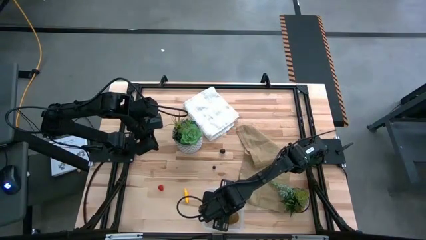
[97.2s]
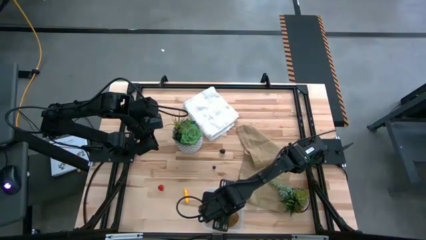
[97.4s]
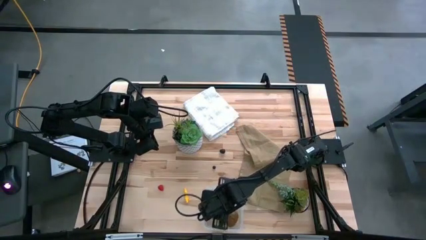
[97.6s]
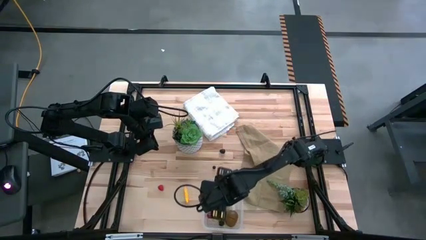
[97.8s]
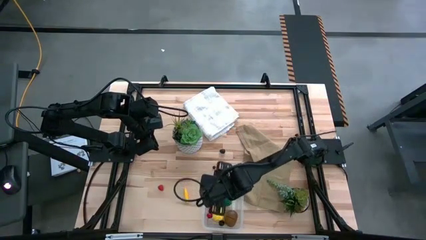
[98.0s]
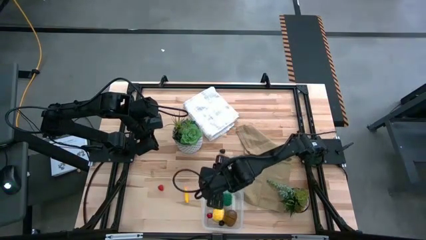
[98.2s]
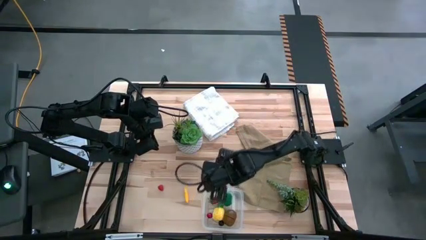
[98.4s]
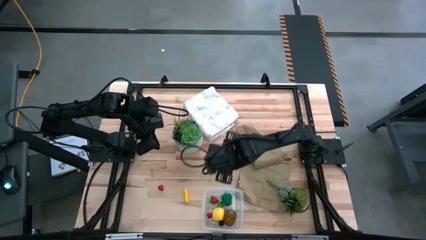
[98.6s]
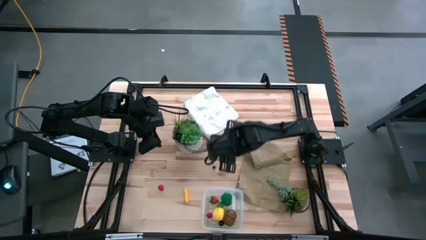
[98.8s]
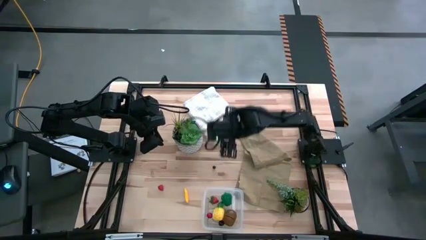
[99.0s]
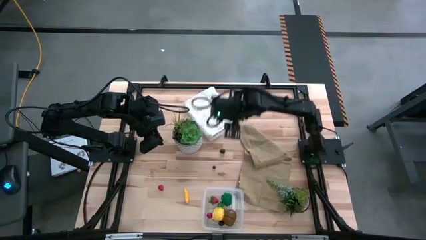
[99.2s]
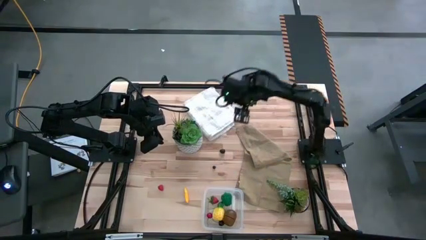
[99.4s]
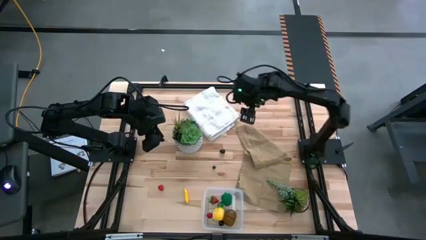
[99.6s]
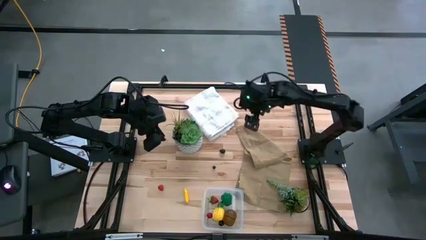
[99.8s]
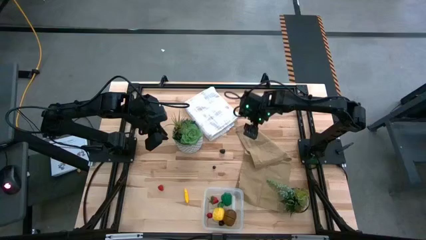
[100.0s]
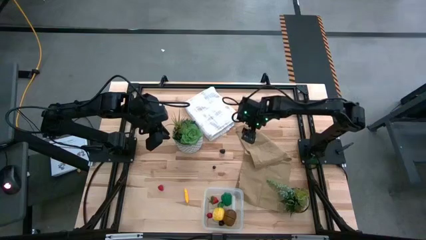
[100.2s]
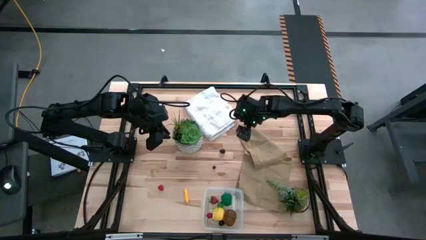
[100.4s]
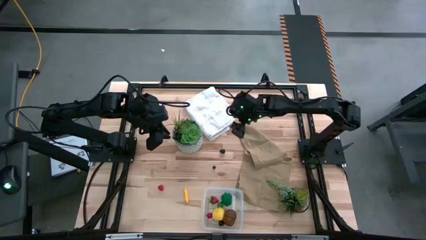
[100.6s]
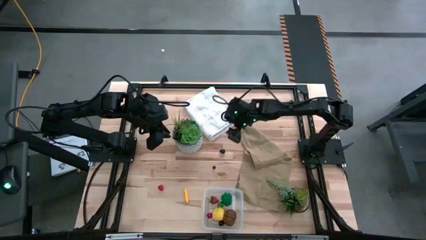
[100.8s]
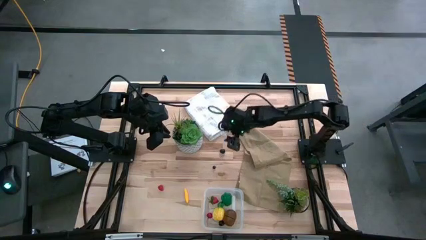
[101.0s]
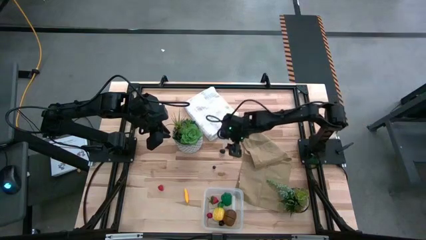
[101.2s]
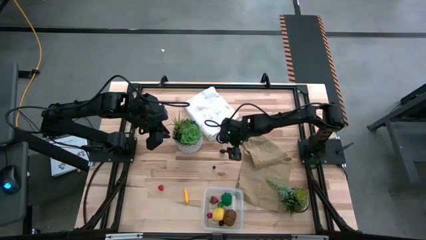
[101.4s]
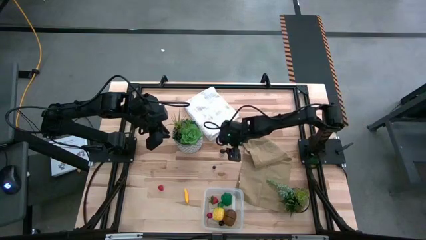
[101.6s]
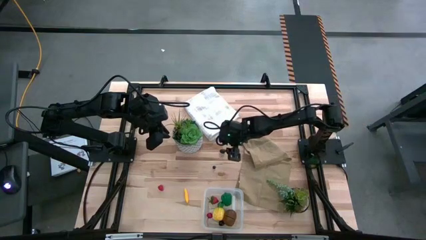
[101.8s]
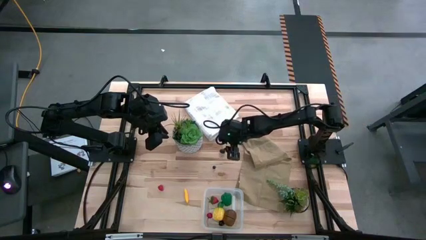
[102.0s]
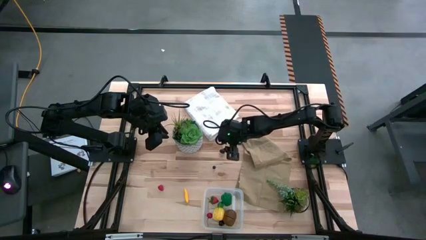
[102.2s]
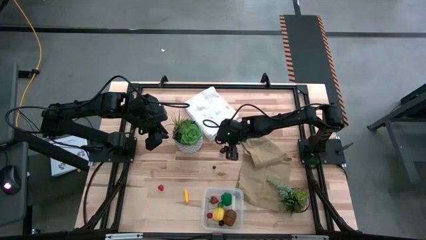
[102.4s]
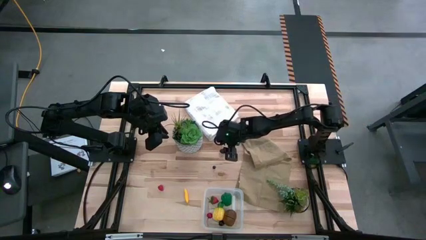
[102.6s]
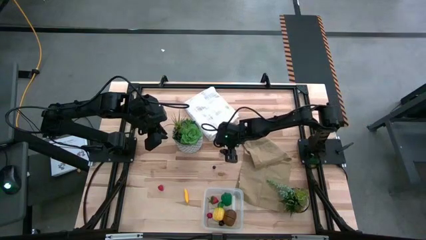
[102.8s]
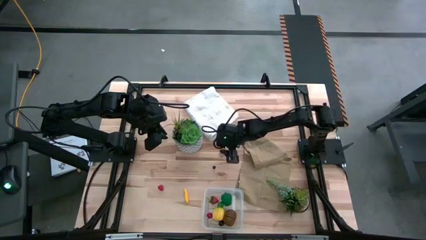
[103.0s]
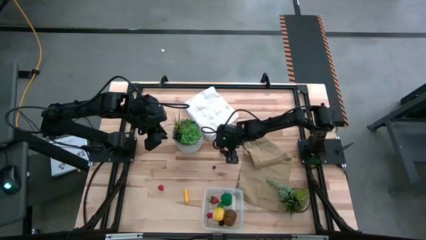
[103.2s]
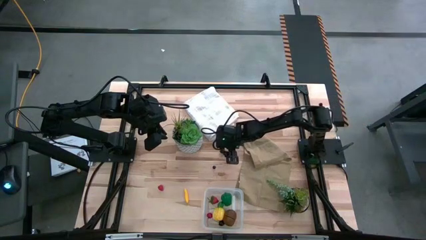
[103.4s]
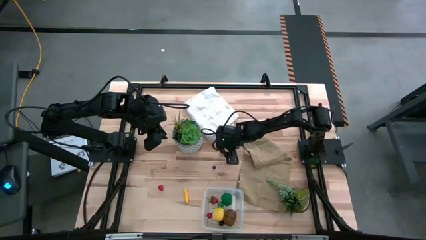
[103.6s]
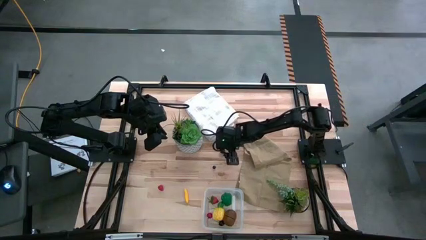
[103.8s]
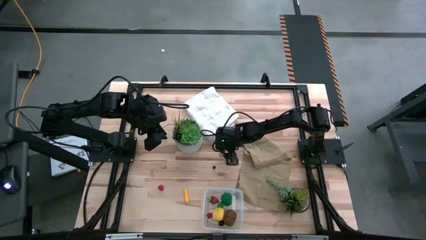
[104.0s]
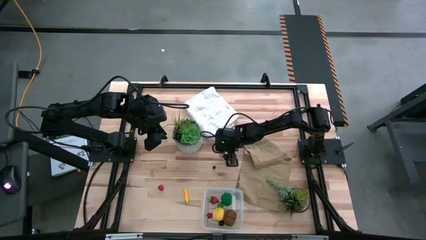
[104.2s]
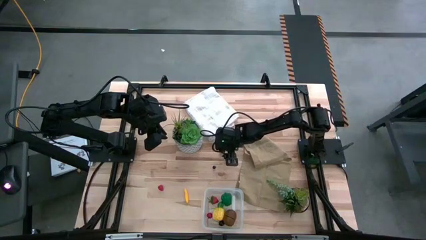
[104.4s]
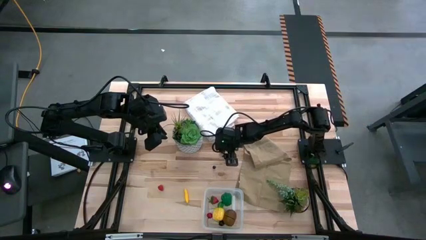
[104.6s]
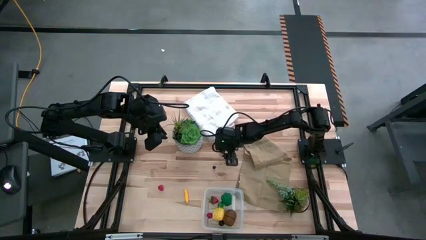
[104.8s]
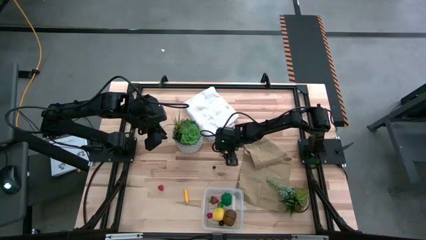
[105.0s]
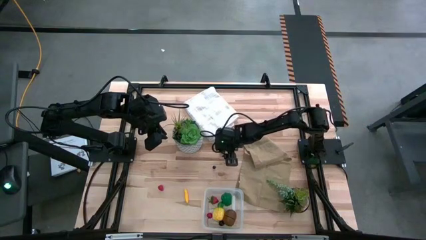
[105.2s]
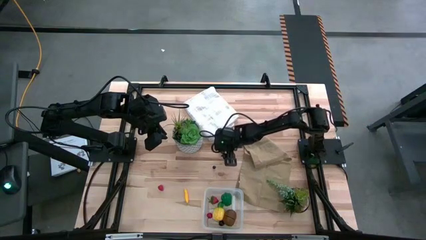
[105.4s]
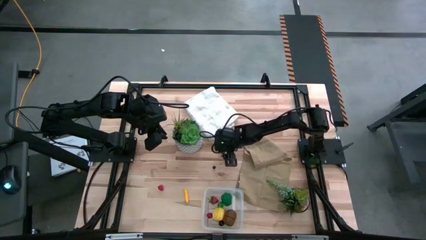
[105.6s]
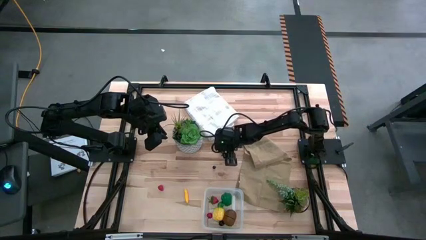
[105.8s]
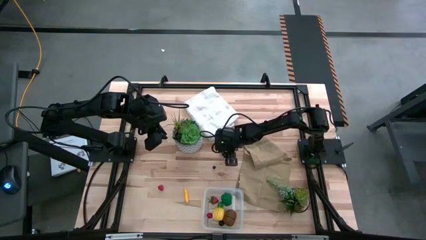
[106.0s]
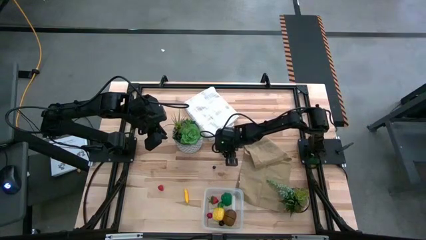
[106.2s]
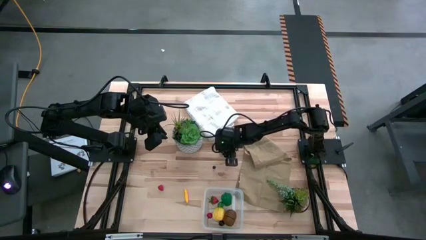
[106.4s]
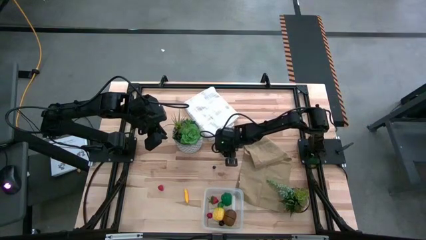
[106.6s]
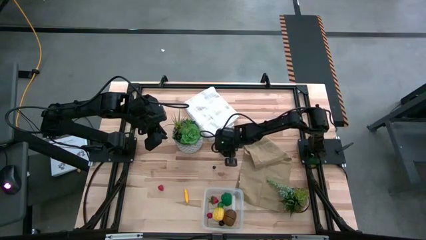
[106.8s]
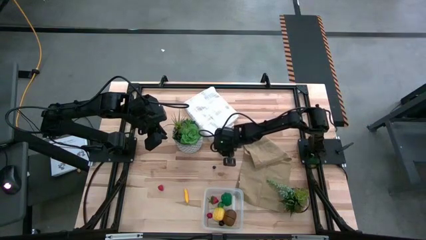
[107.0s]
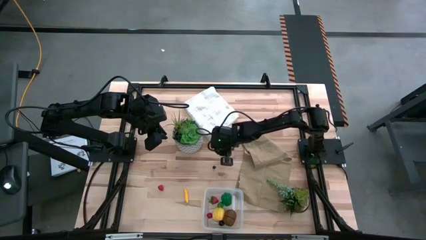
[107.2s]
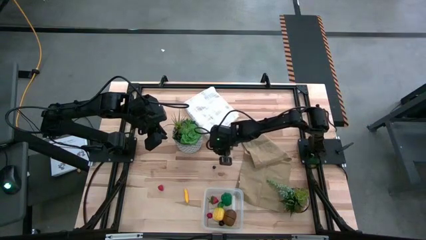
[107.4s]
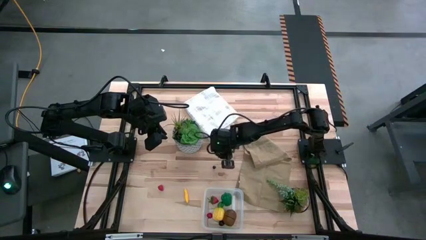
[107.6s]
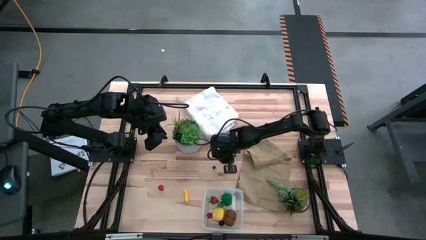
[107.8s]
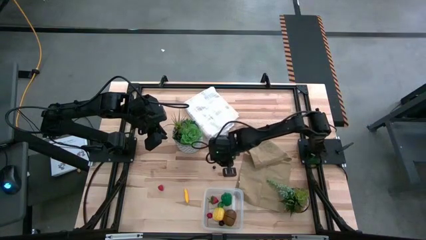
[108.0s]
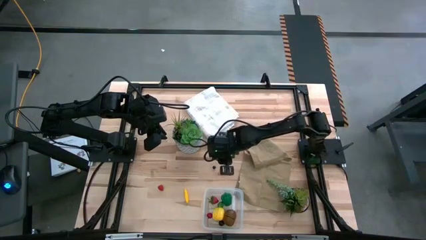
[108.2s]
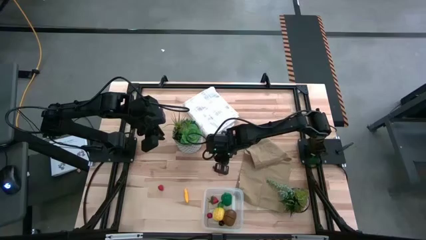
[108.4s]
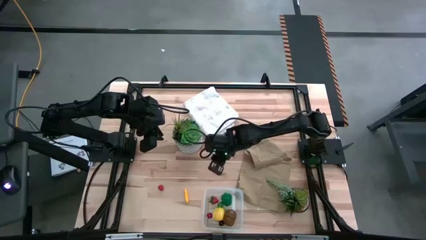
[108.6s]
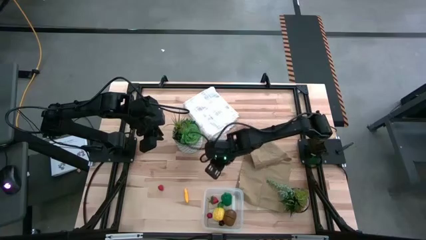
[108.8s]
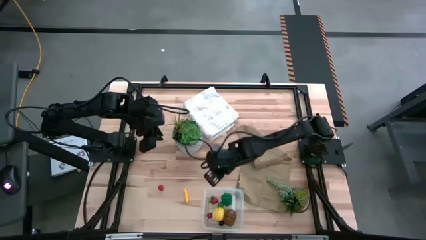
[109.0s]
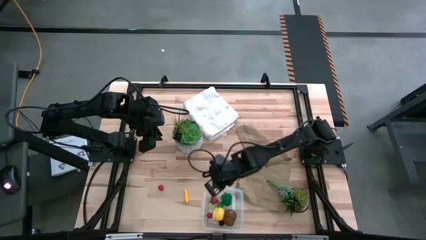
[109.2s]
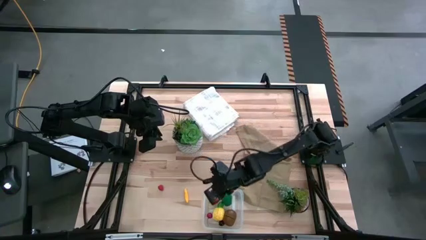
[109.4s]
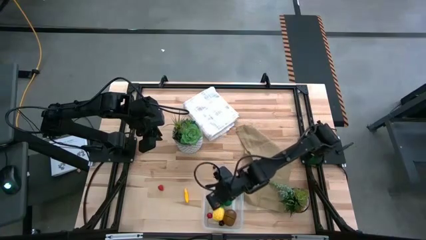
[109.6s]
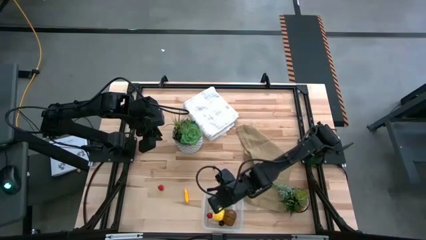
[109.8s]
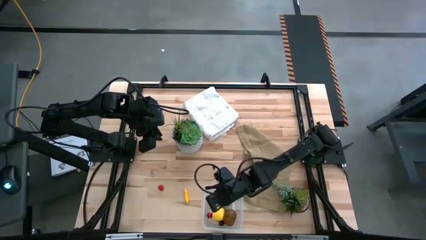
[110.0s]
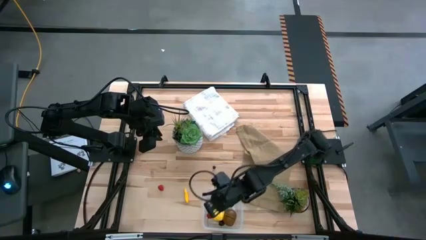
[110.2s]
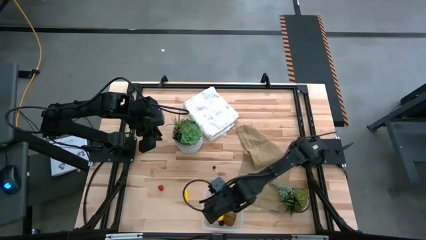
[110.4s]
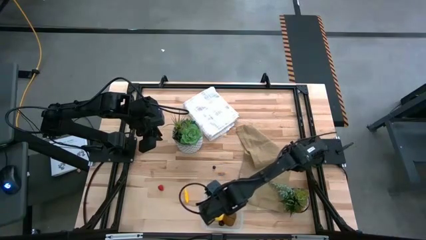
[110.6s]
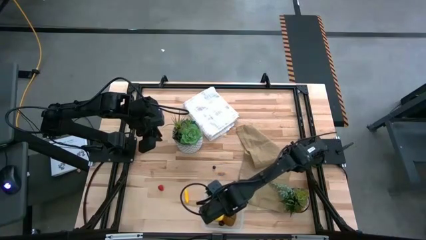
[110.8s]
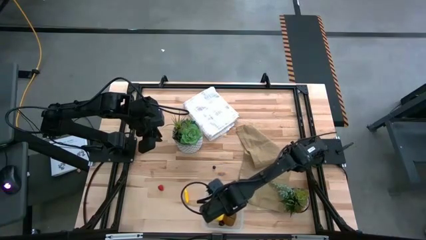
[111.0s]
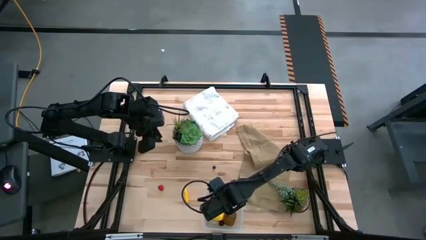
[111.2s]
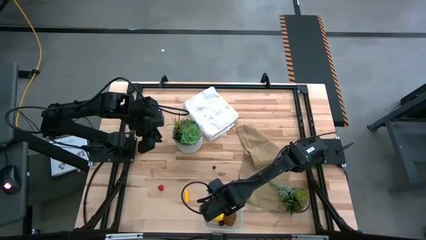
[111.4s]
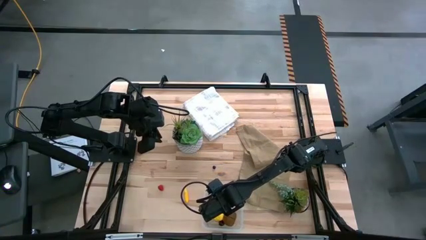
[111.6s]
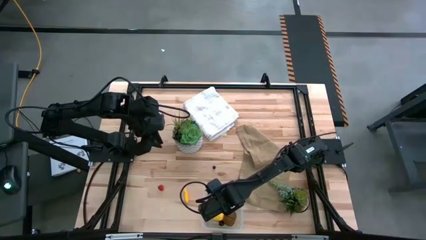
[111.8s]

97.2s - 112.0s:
Task: Pick and placing Produce into tupperware
Put the dark purple blackberry into the transparent bin
